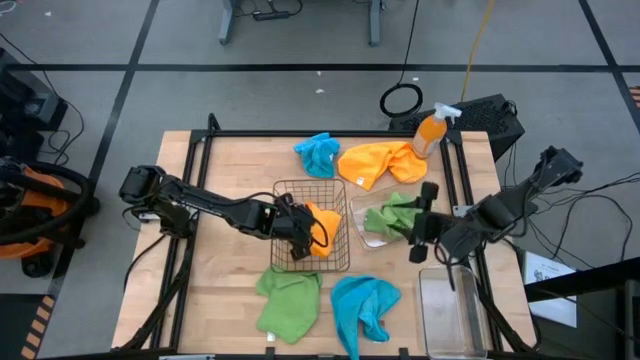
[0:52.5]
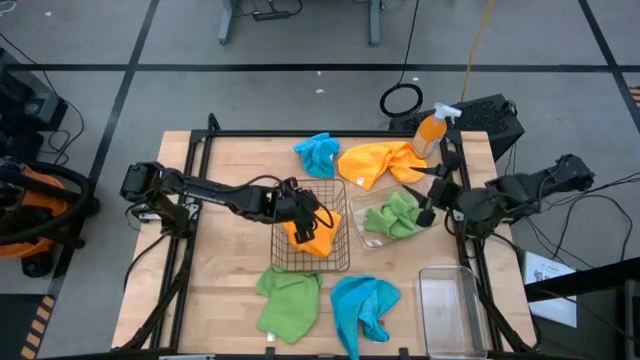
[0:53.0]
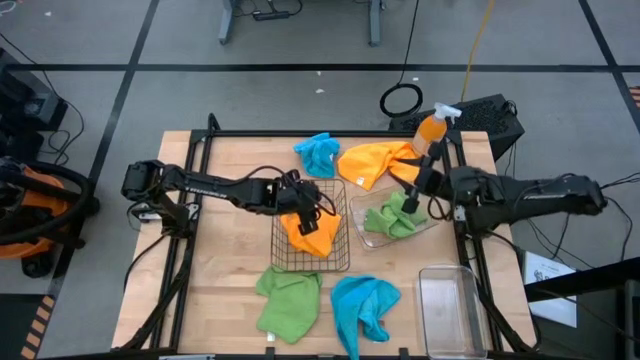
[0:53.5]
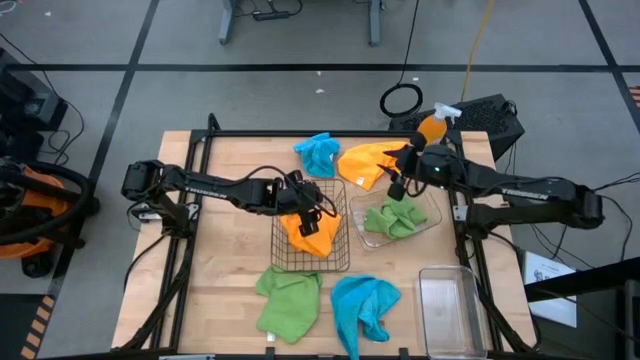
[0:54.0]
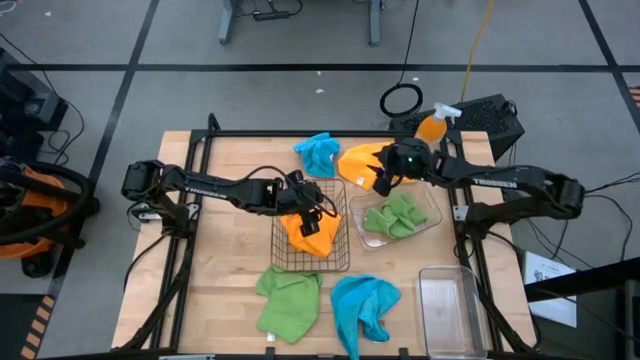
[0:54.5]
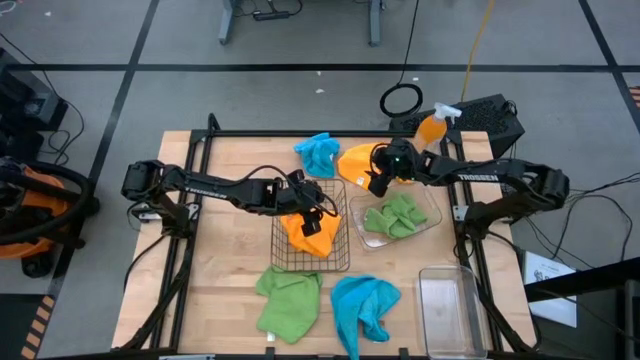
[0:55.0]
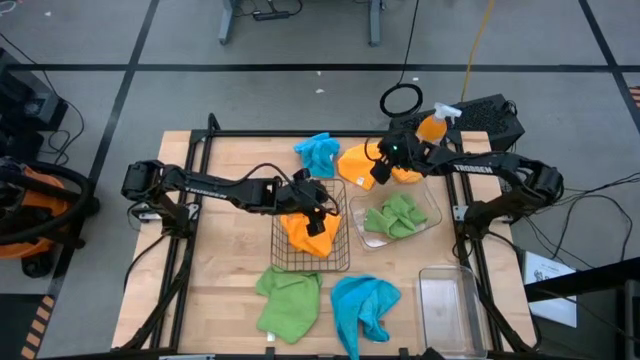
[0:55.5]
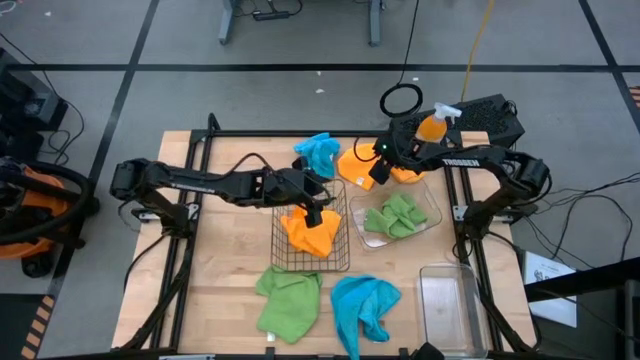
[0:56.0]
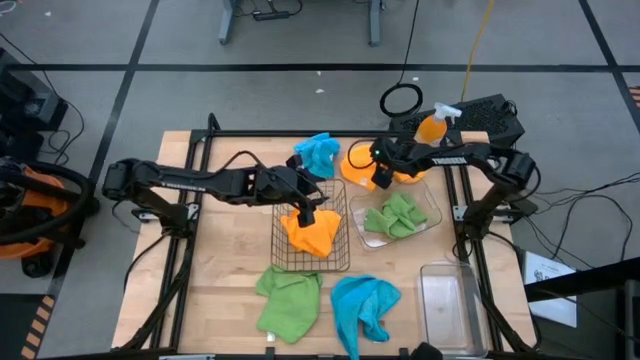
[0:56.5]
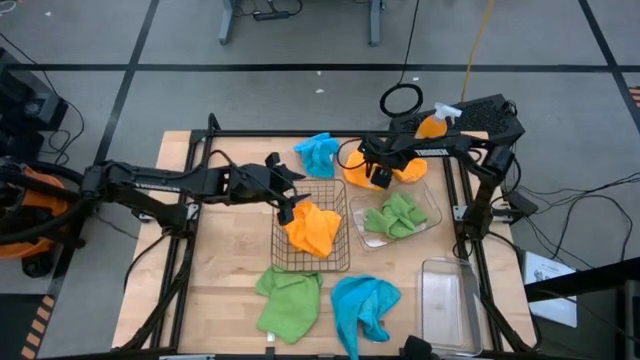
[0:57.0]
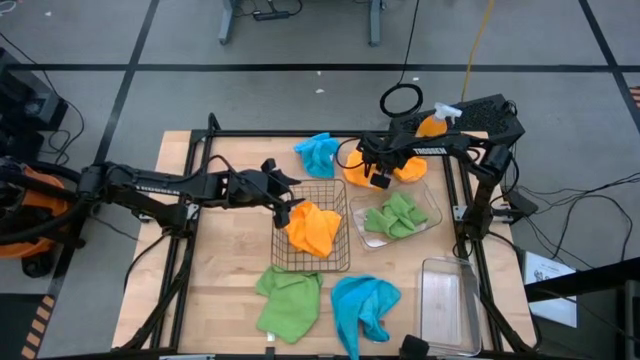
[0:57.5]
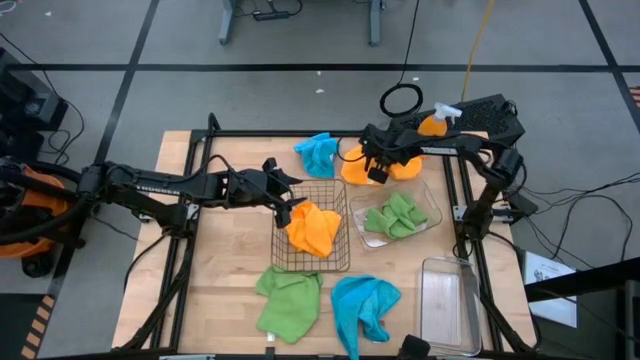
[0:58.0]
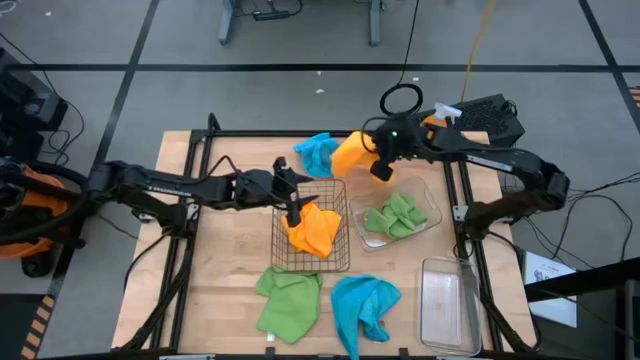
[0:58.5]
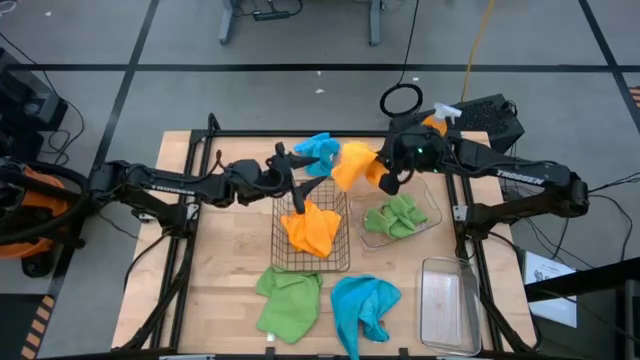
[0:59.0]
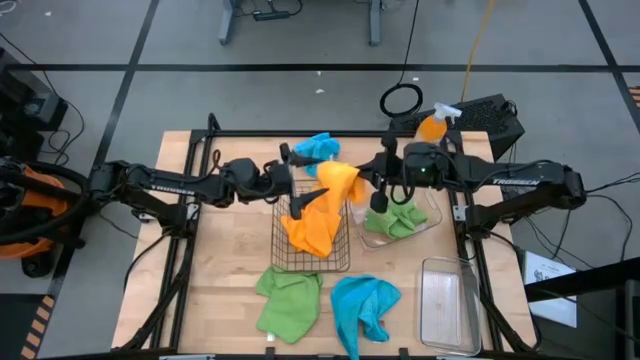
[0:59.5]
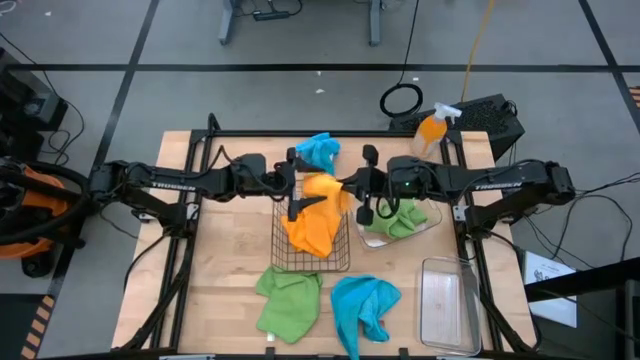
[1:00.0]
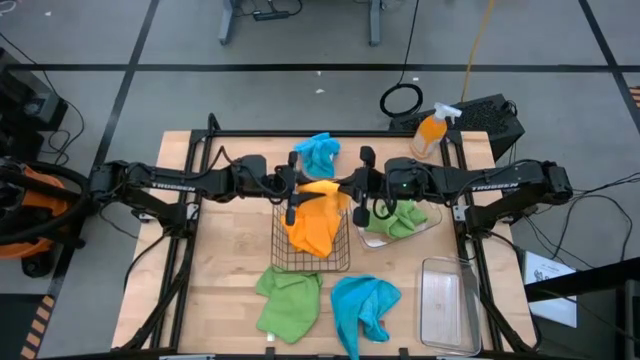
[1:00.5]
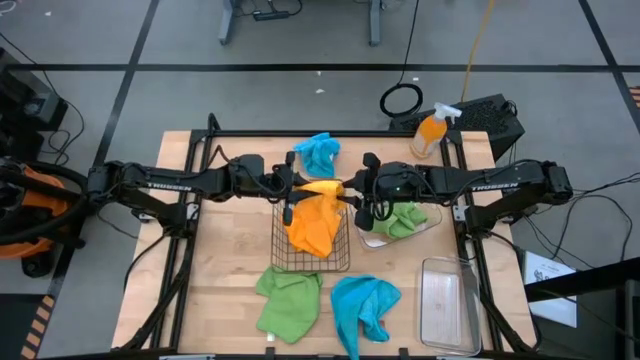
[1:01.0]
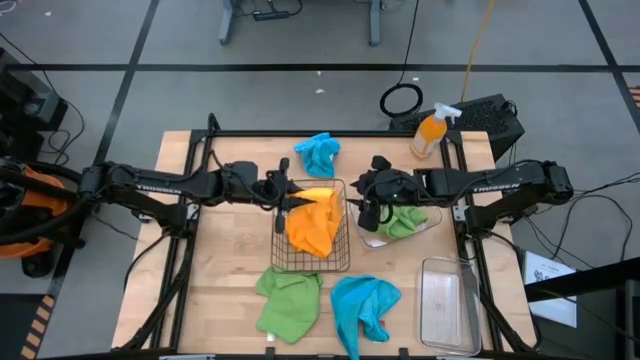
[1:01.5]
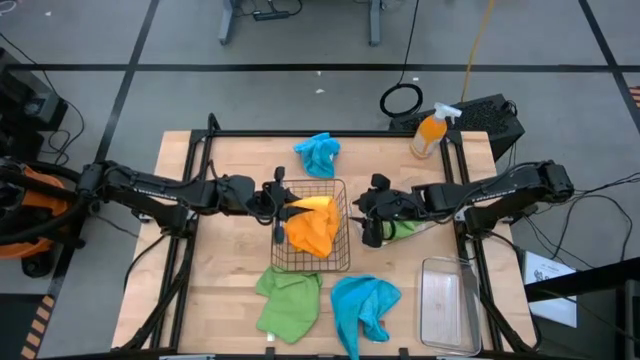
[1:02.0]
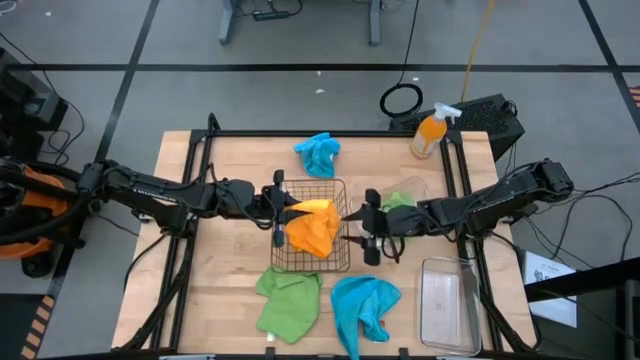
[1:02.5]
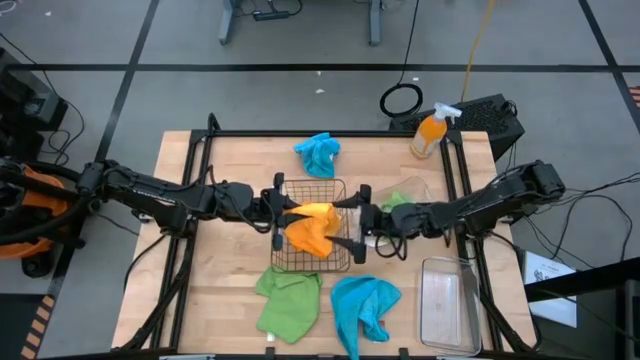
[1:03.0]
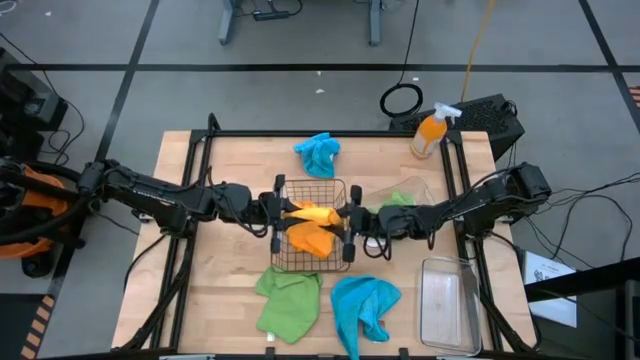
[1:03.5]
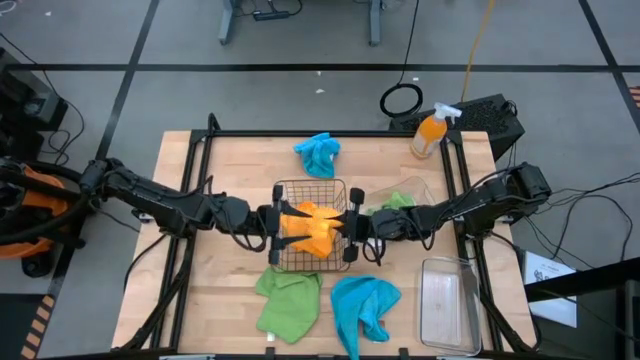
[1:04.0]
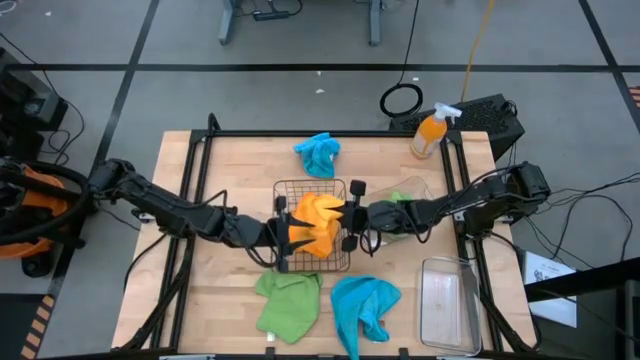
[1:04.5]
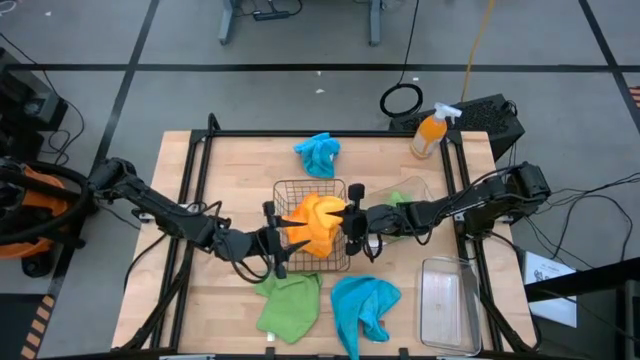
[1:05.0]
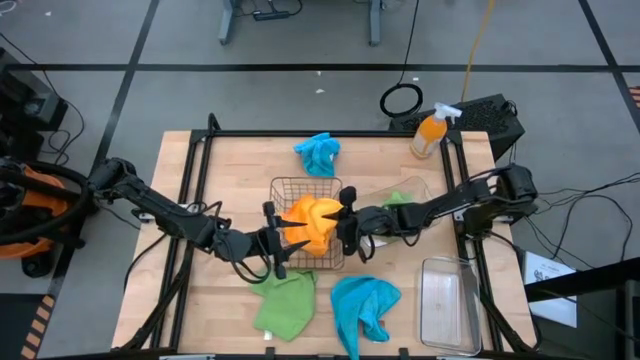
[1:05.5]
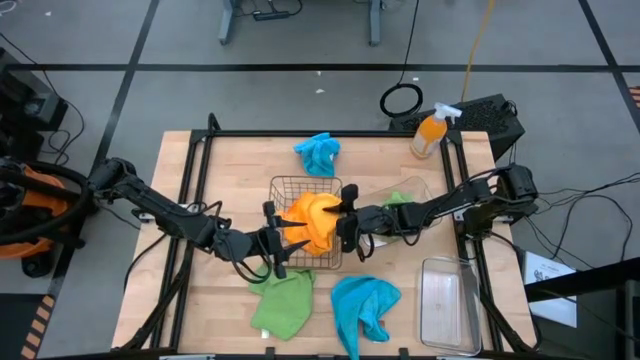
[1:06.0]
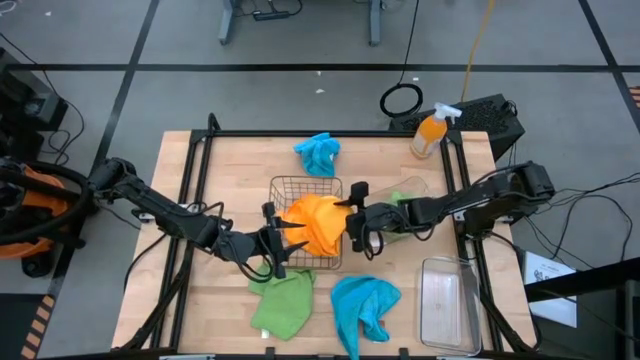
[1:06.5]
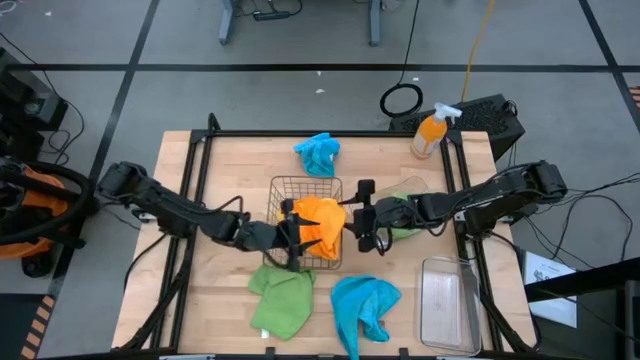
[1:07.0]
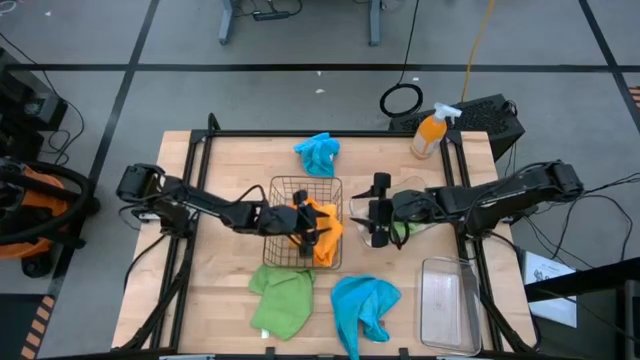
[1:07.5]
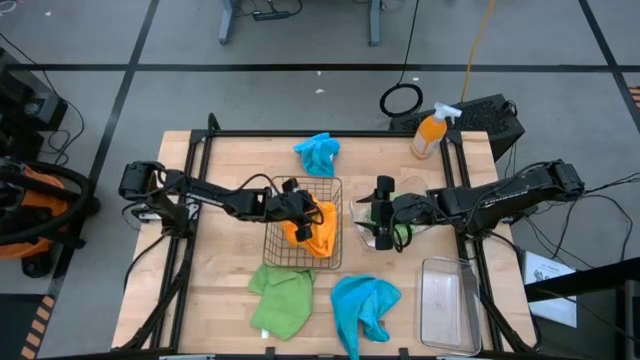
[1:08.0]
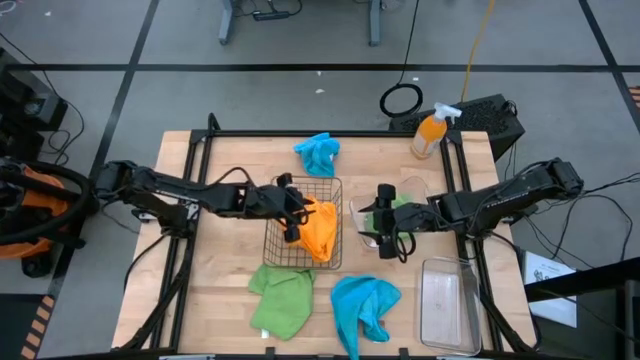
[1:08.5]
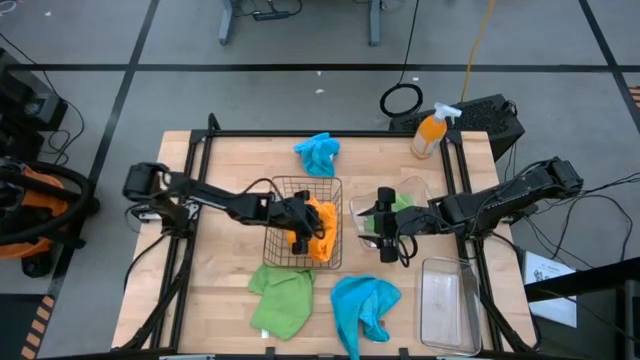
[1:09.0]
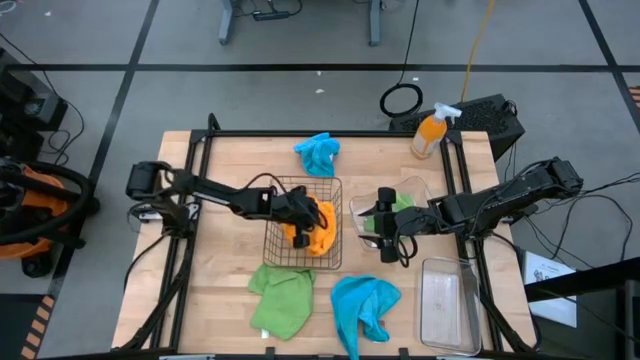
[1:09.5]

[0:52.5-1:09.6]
Task: Sort microfiber towel by color & place in baskets
Put the yellow towel into the wire basket

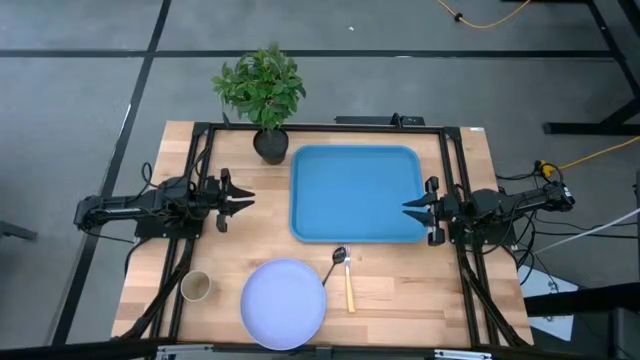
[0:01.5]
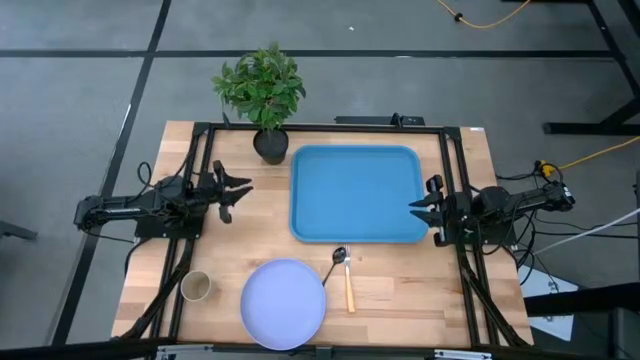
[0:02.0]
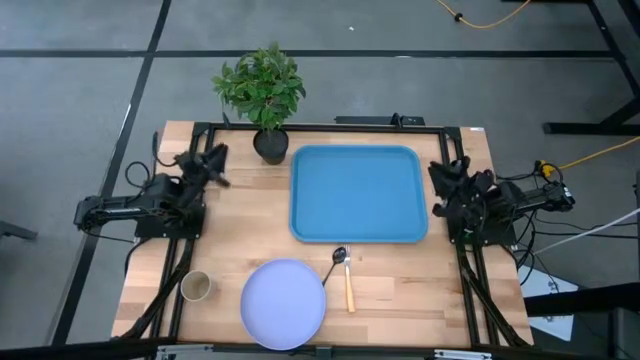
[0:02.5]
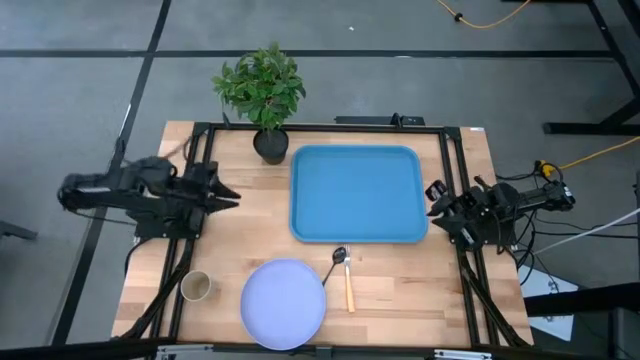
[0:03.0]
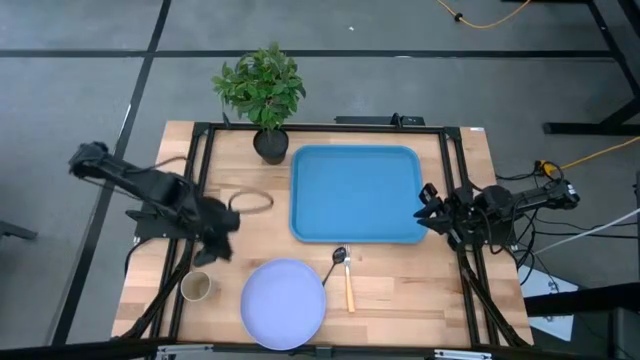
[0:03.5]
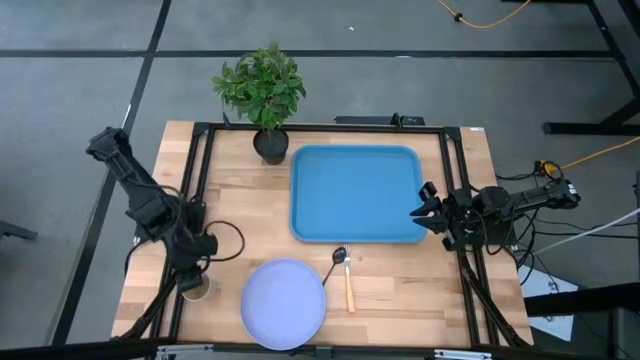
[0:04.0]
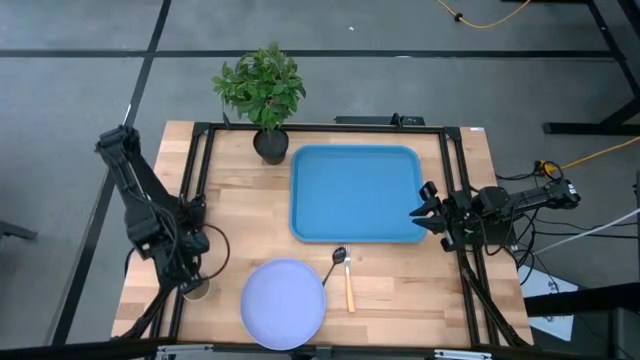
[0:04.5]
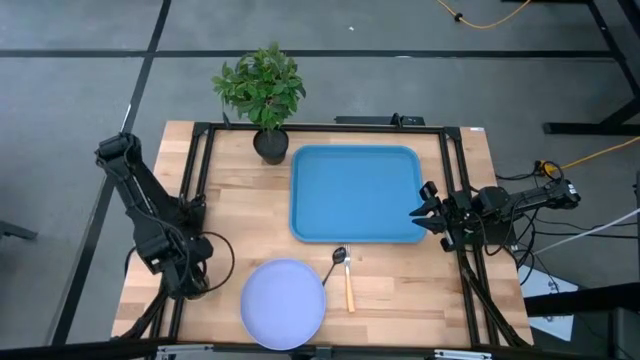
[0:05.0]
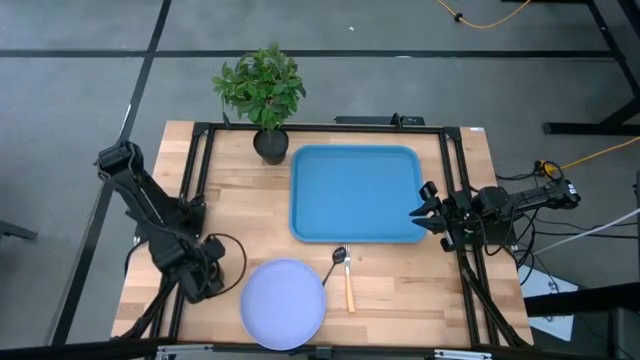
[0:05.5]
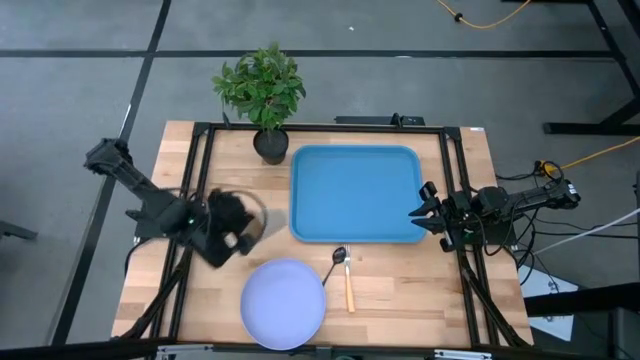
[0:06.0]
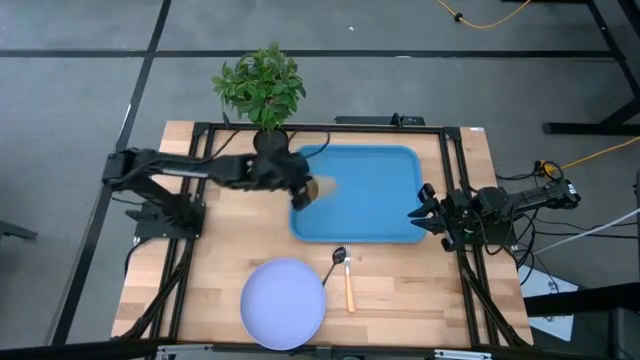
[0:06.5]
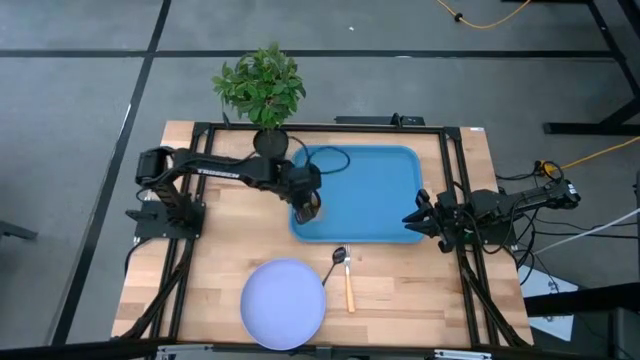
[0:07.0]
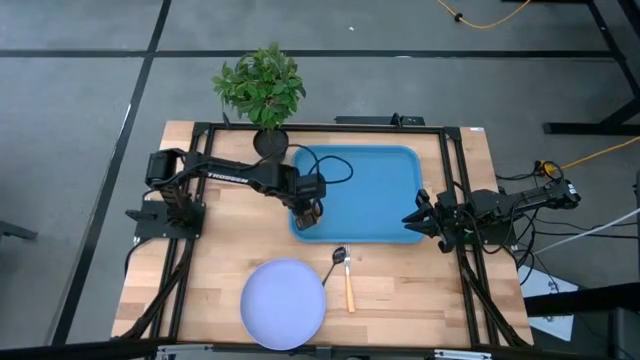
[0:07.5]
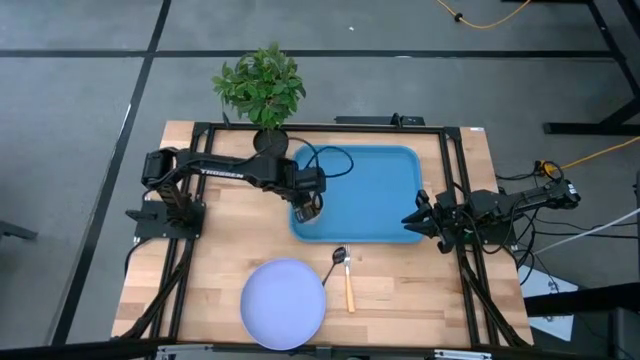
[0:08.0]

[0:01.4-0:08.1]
Task: Pick and place plate/cup/fork/spoon on tray
Put the cup on the bottom left of the tray
